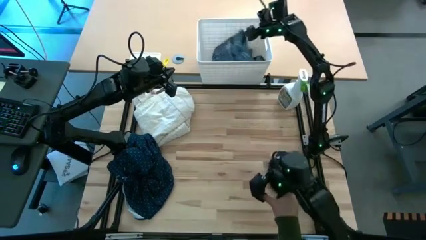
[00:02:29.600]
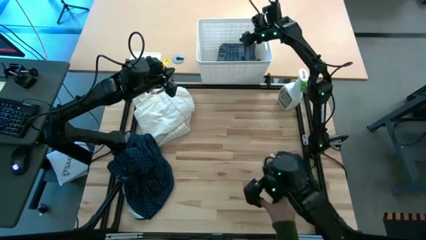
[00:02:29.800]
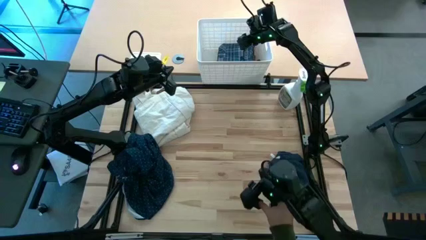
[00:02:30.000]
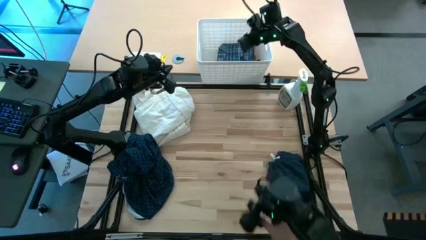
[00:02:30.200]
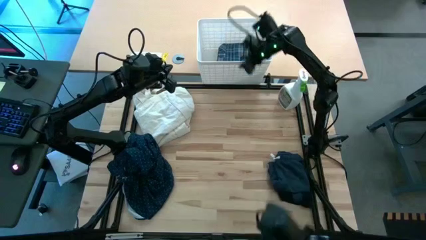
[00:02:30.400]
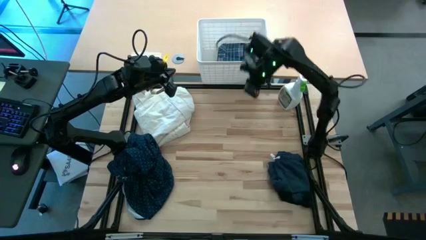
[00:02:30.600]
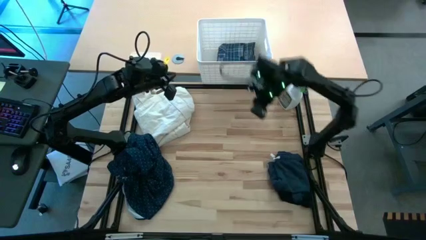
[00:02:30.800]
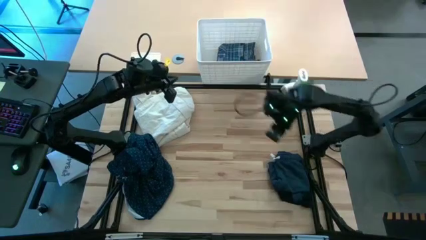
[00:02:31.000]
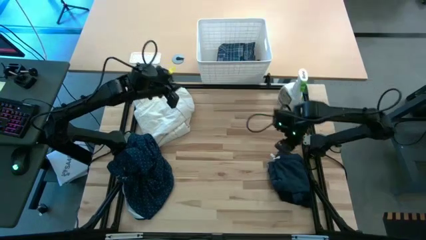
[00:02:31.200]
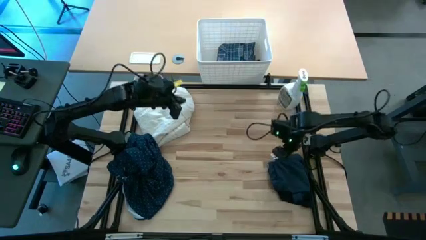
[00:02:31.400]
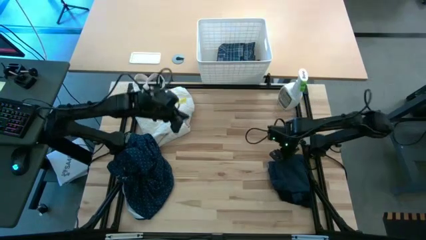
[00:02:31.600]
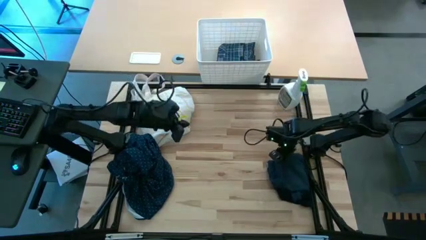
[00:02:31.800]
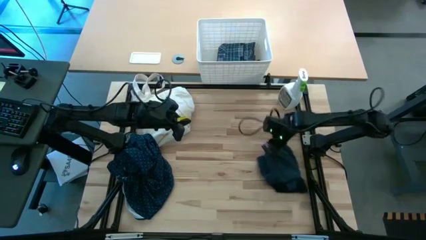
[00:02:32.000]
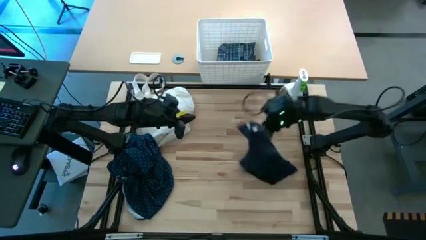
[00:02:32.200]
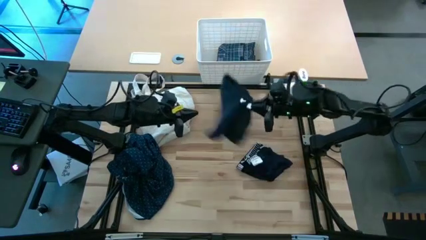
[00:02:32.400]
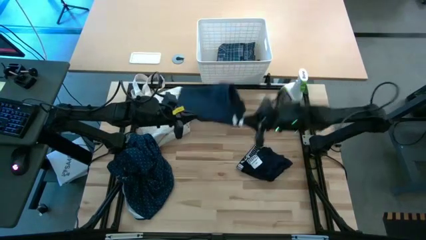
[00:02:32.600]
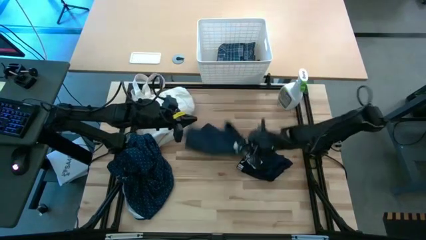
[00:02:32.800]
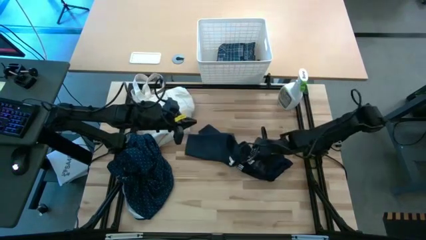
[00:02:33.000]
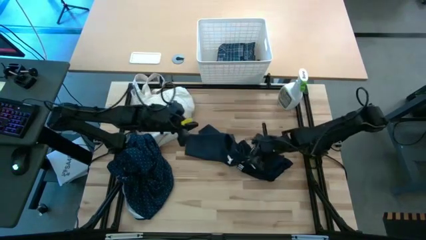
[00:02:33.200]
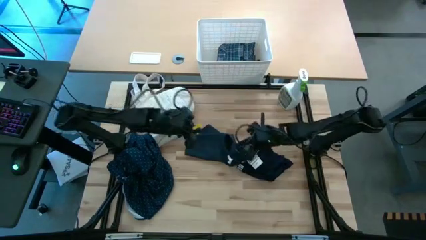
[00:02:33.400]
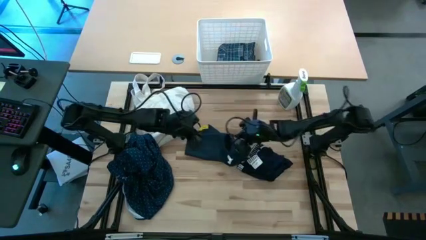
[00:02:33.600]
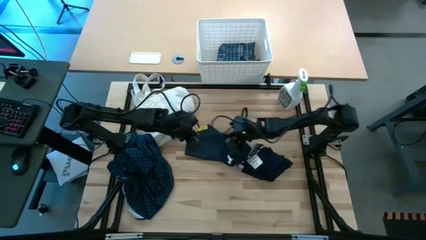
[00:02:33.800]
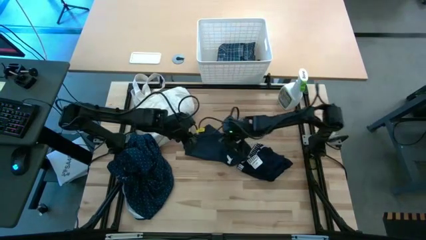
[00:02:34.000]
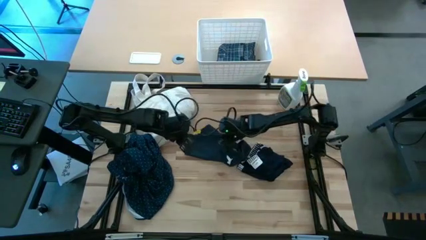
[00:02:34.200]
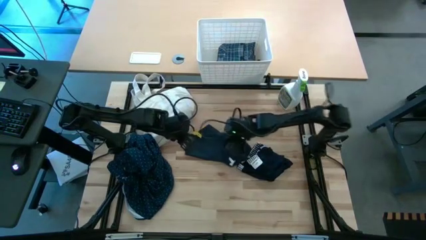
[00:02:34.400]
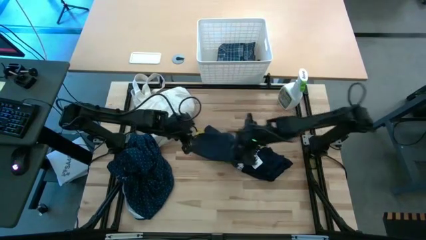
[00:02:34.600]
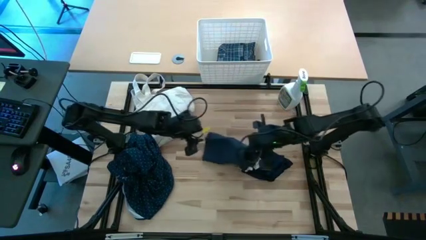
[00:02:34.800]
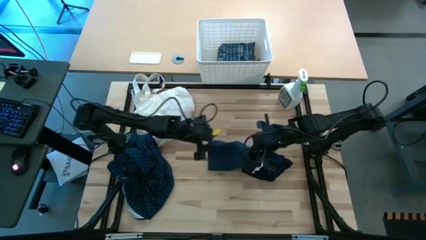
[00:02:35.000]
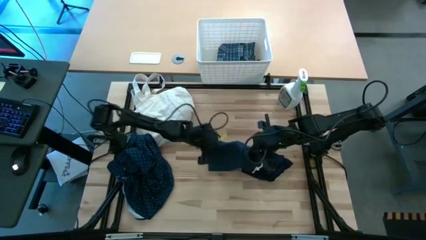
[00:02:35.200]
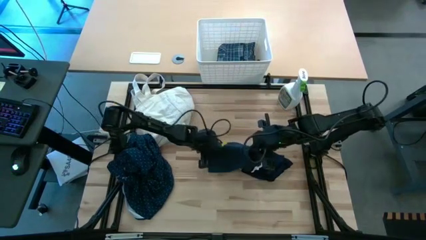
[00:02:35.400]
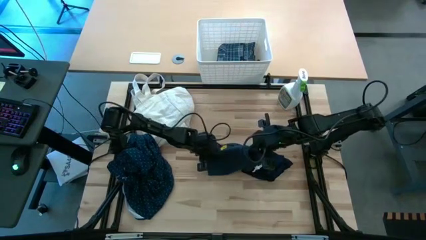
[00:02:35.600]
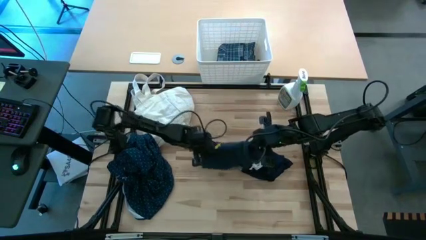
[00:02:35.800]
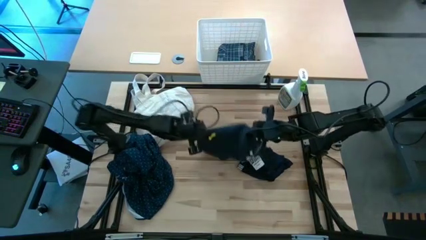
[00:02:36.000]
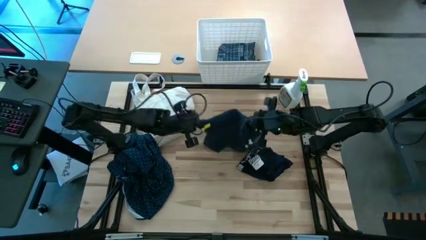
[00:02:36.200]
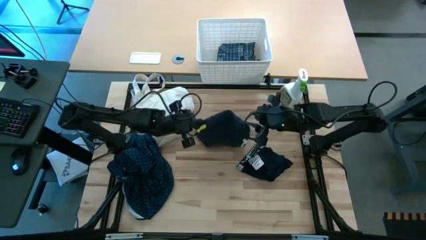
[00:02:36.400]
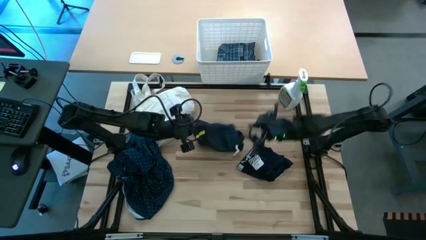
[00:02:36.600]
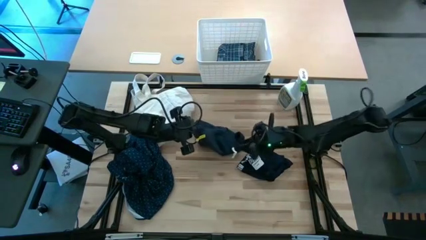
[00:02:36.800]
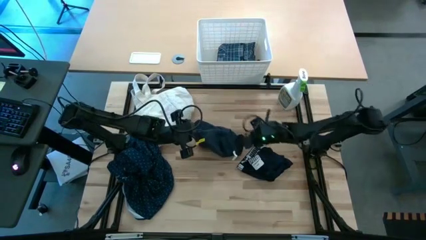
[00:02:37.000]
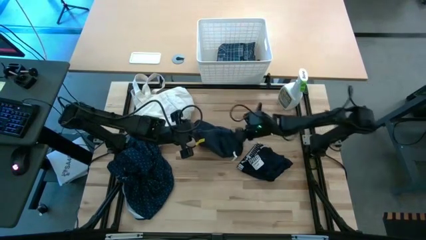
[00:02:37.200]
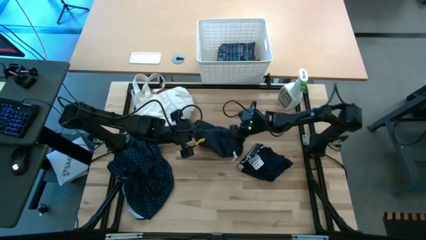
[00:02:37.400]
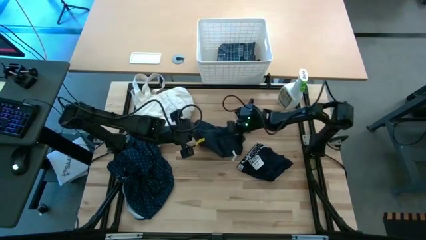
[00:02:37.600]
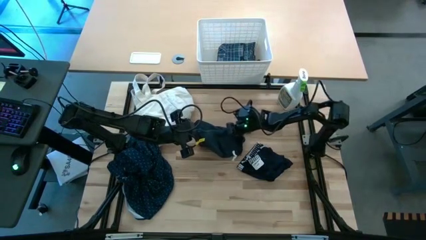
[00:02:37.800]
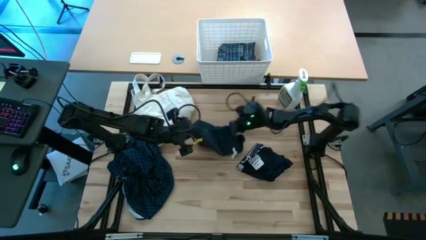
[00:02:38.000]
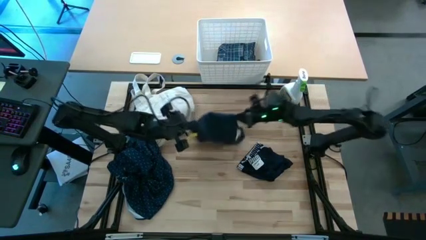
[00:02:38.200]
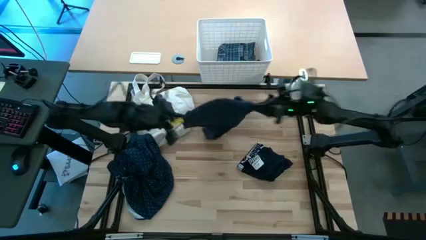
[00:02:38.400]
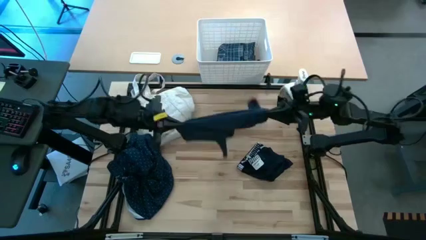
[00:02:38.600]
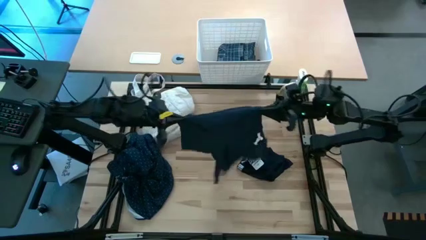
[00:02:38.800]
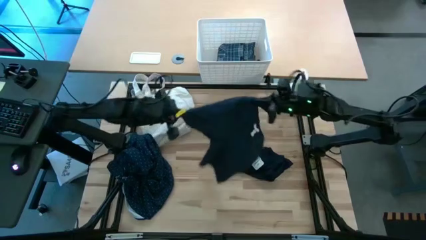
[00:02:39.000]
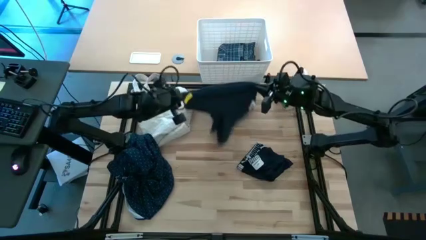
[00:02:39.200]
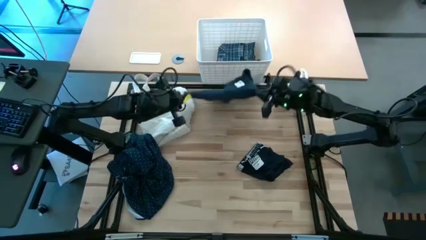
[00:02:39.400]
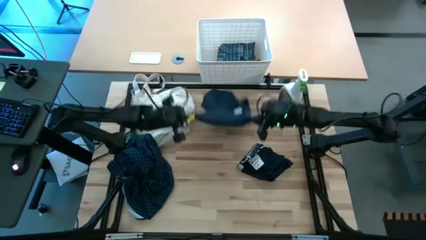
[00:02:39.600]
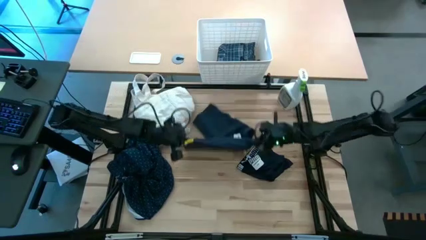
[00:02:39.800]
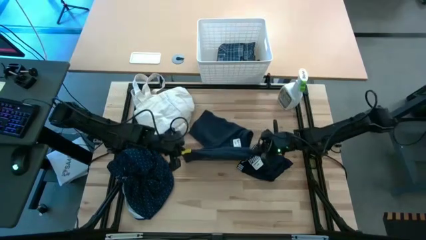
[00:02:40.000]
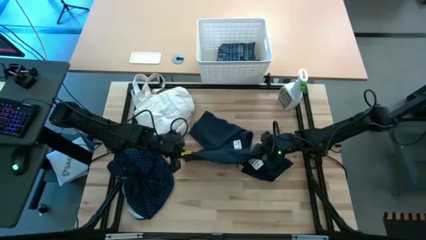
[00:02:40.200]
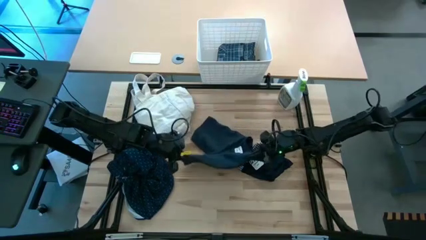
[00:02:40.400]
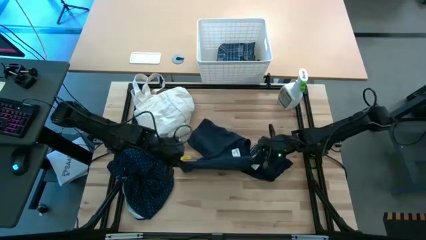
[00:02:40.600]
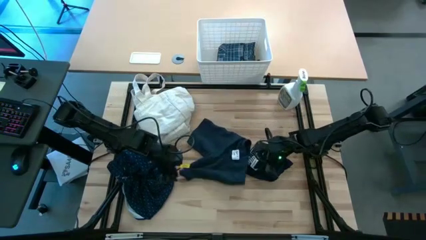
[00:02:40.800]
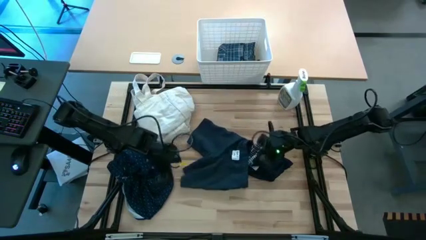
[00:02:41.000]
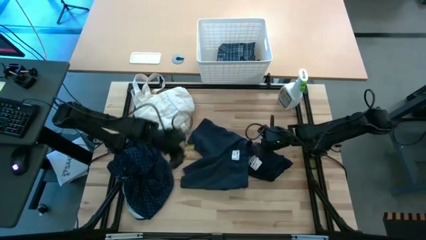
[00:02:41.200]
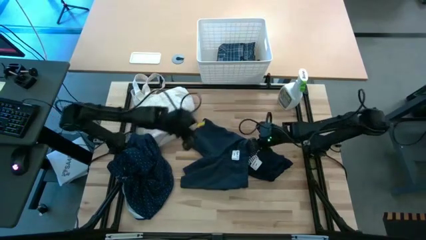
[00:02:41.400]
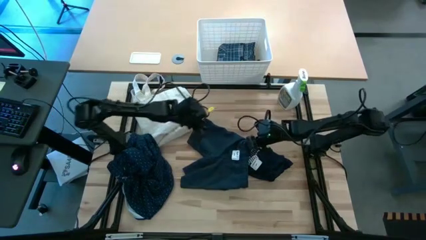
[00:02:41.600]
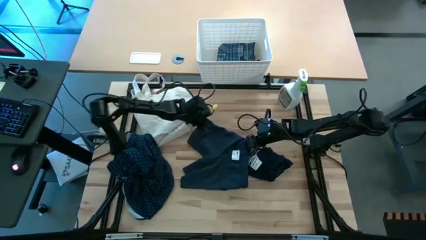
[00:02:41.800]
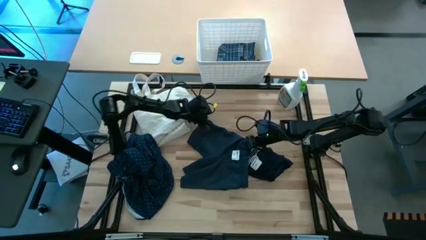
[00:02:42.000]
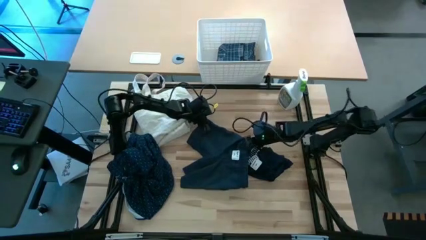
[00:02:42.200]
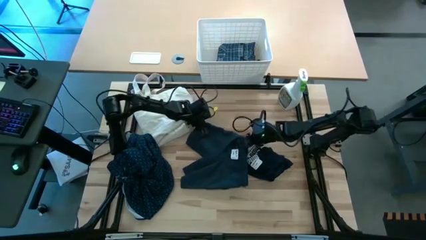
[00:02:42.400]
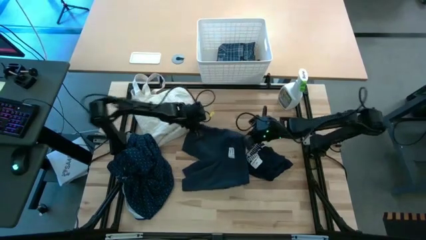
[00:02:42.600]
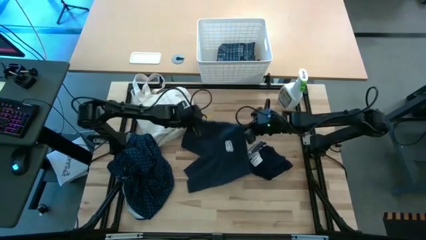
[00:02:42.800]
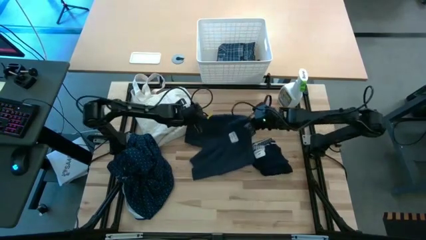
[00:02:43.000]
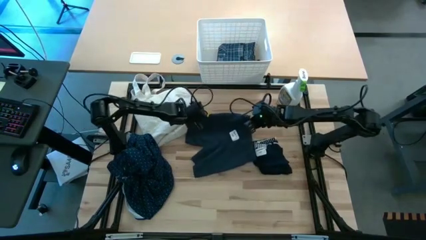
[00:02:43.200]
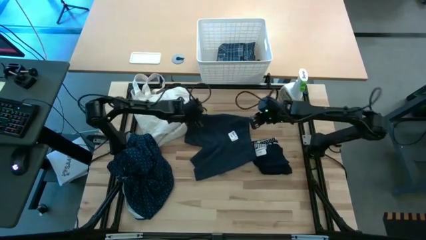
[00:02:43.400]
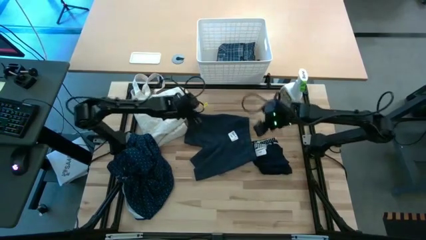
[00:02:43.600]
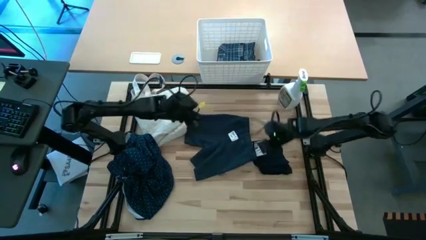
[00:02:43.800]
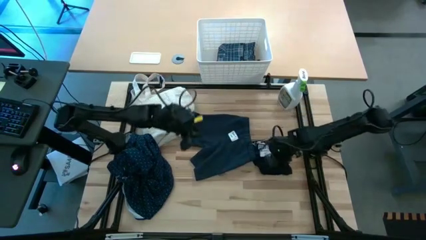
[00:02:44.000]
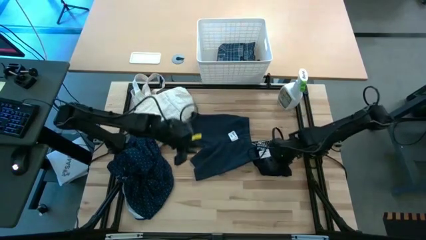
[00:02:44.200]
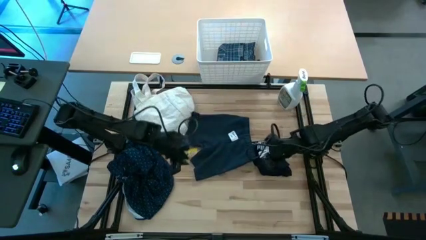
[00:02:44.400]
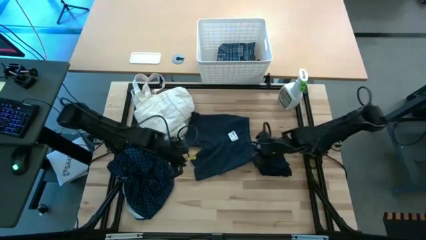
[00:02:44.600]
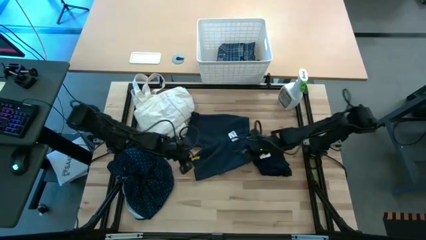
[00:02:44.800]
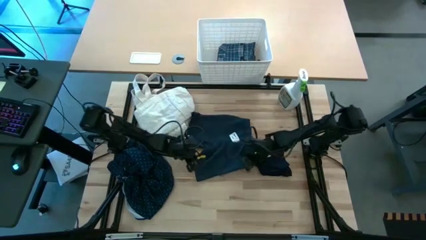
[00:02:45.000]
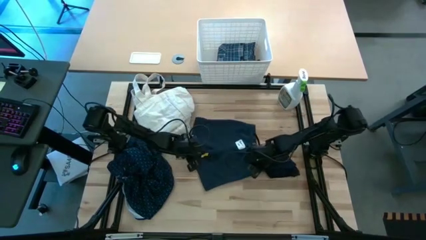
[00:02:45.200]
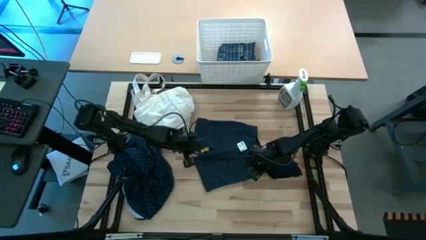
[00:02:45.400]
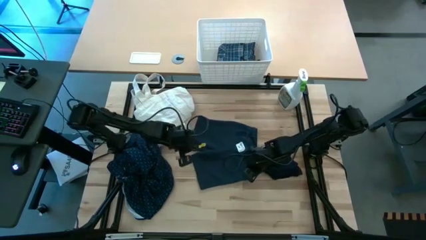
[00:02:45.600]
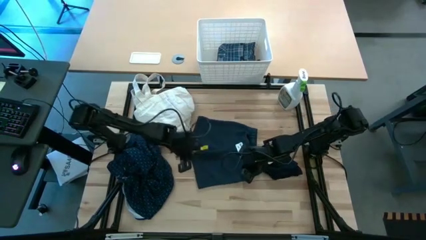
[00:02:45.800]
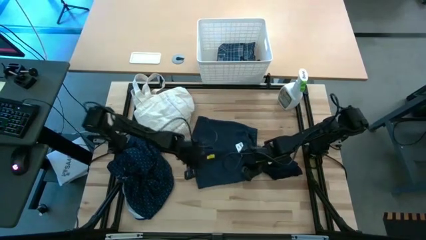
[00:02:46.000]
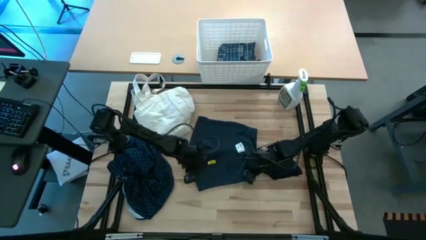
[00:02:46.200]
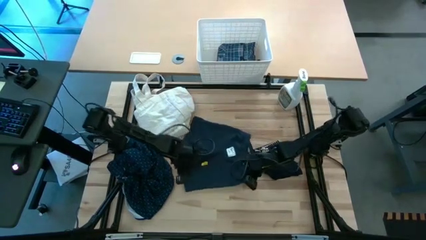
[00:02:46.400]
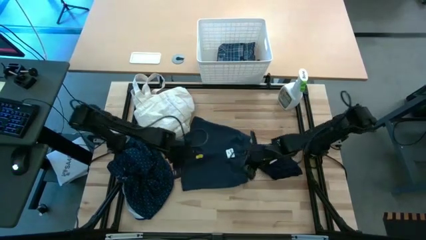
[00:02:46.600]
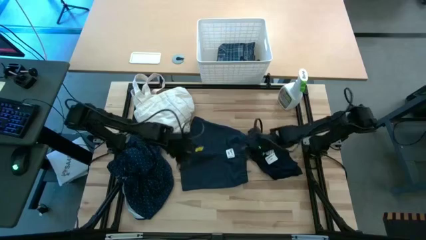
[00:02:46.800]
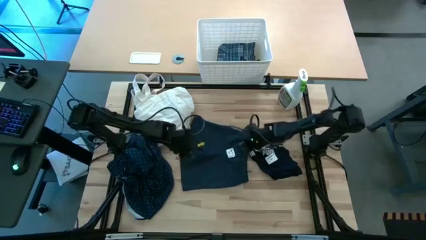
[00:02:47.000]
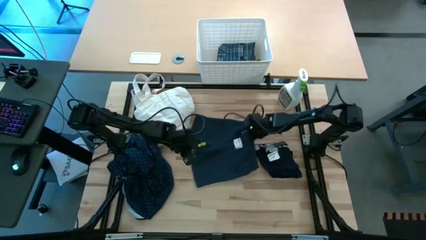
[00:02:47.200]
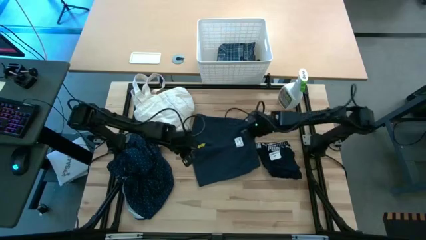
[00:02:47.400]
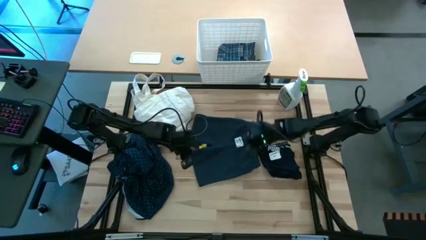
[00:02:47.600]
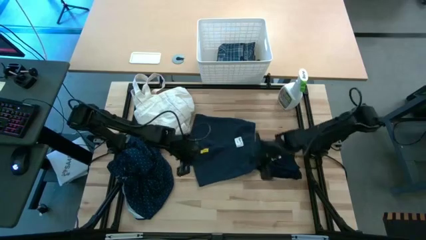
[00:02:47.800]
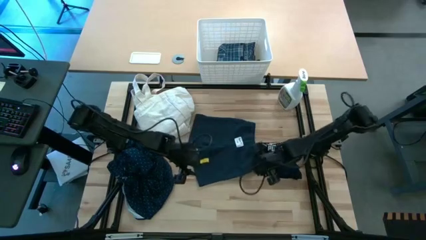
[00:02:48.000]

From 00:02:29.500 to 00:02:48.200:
Fold the black short
